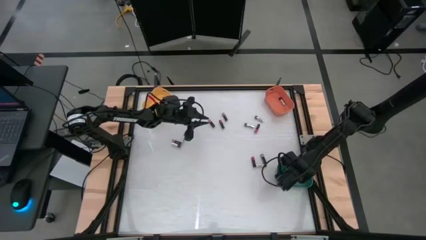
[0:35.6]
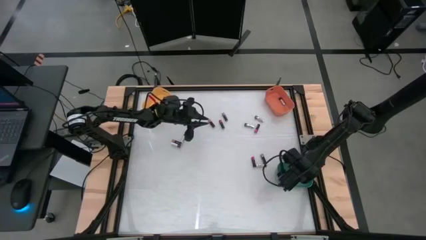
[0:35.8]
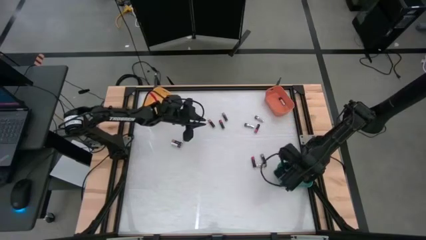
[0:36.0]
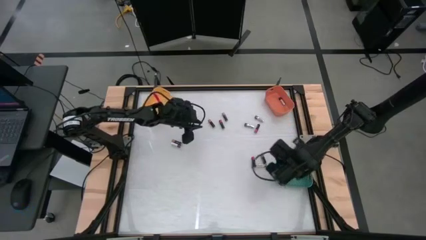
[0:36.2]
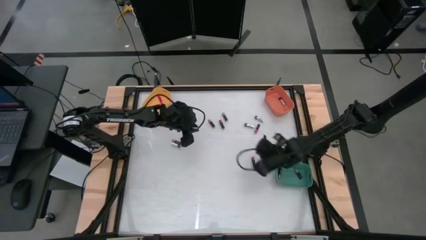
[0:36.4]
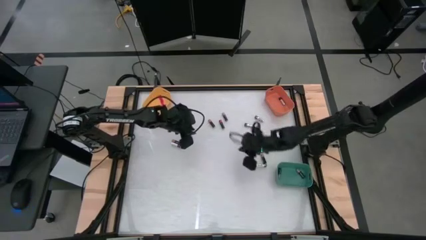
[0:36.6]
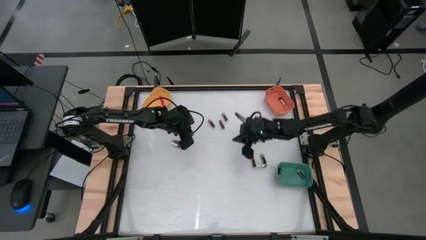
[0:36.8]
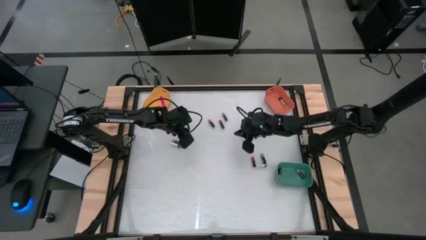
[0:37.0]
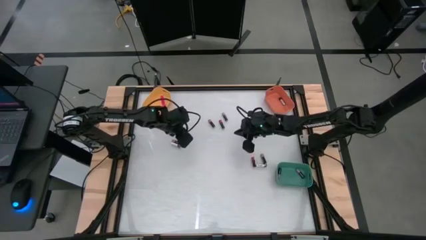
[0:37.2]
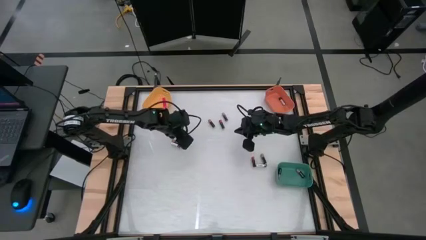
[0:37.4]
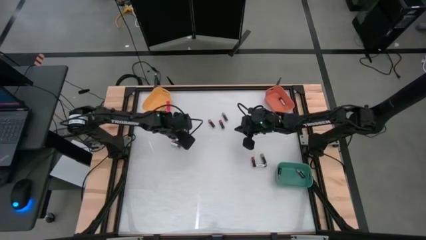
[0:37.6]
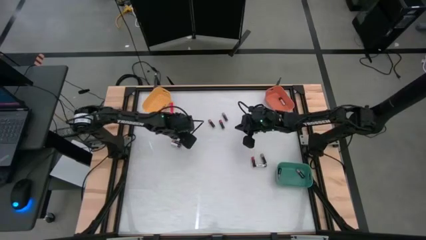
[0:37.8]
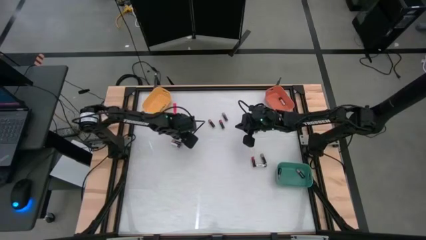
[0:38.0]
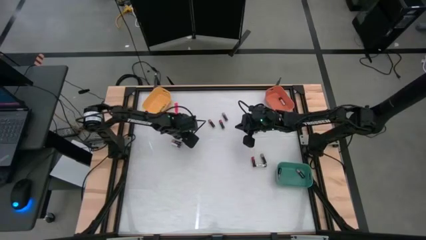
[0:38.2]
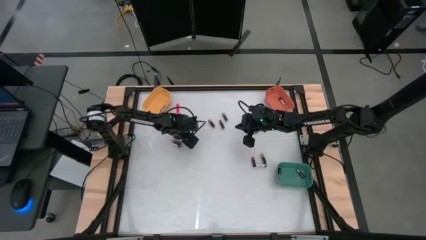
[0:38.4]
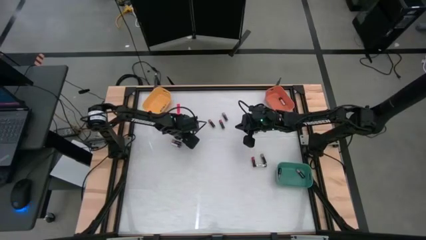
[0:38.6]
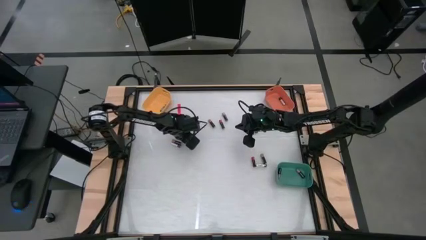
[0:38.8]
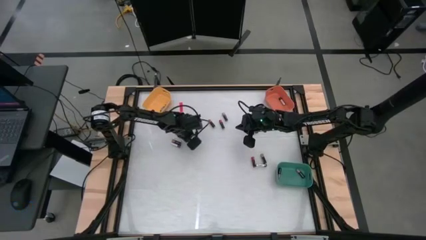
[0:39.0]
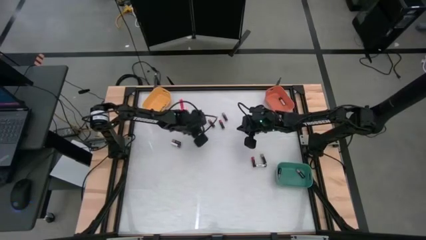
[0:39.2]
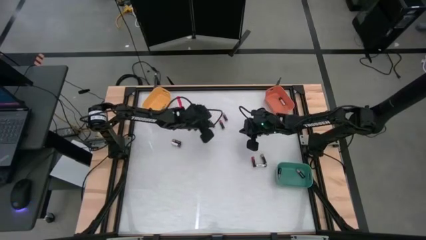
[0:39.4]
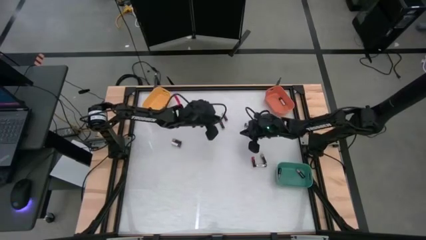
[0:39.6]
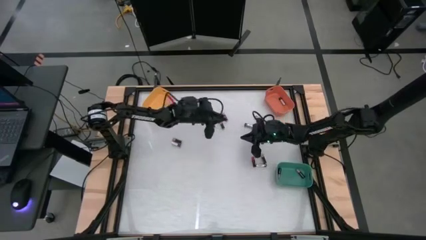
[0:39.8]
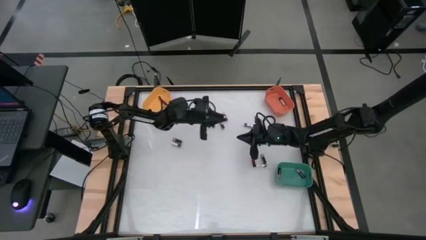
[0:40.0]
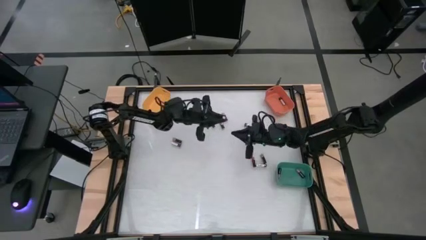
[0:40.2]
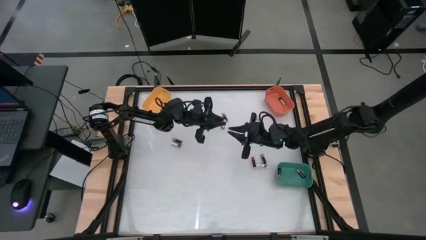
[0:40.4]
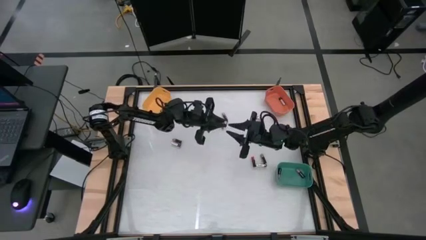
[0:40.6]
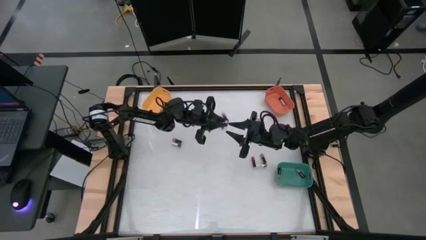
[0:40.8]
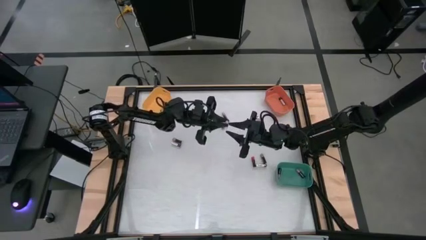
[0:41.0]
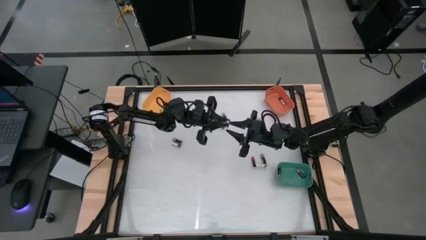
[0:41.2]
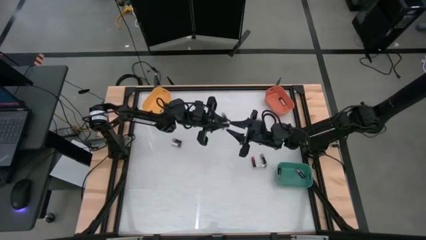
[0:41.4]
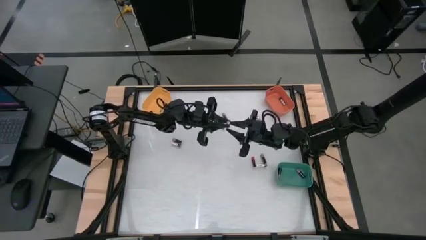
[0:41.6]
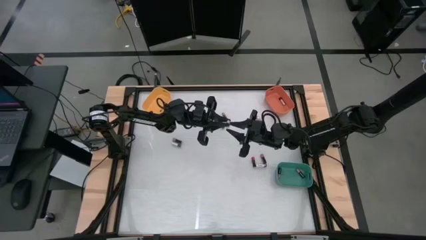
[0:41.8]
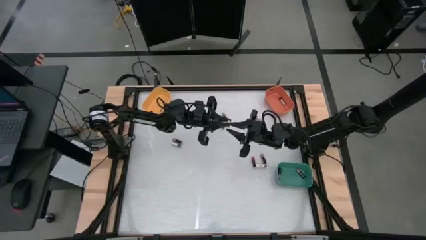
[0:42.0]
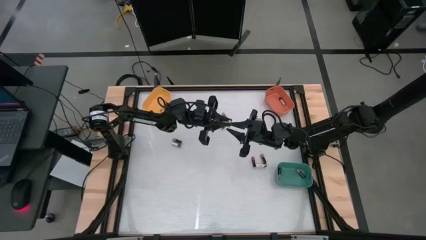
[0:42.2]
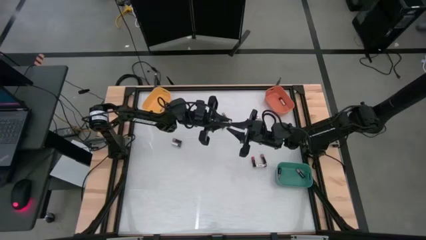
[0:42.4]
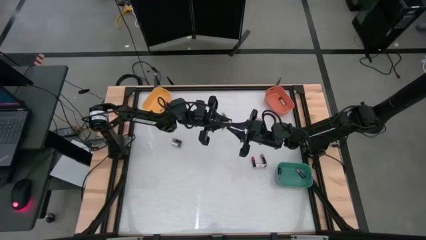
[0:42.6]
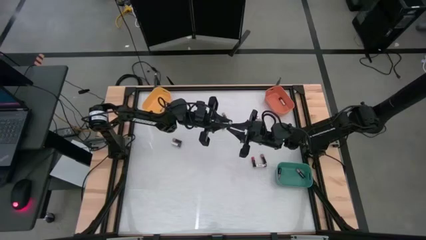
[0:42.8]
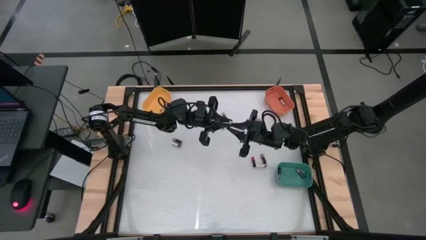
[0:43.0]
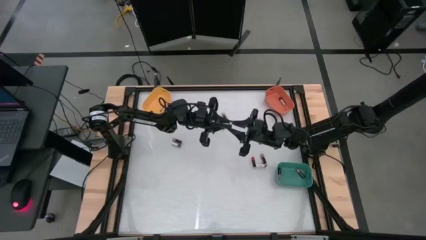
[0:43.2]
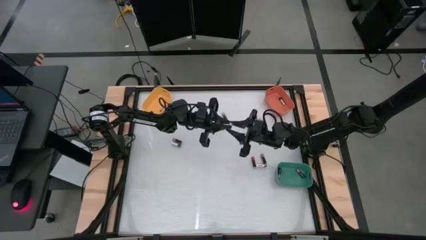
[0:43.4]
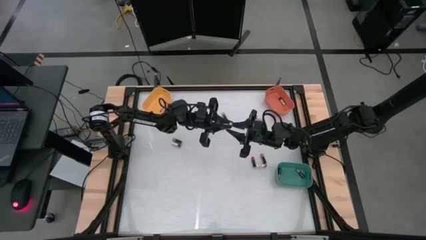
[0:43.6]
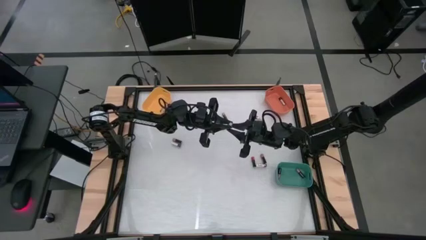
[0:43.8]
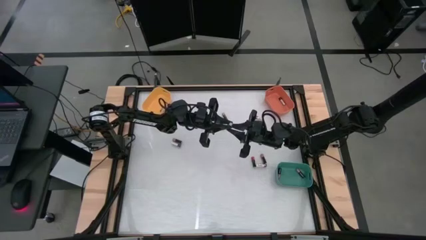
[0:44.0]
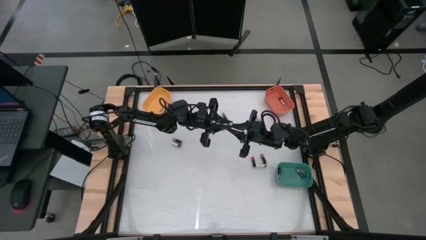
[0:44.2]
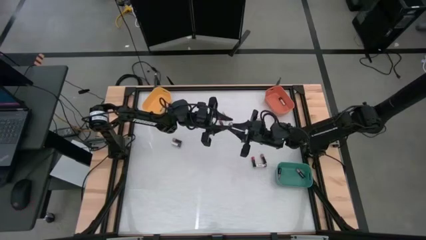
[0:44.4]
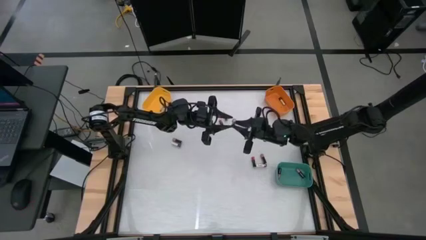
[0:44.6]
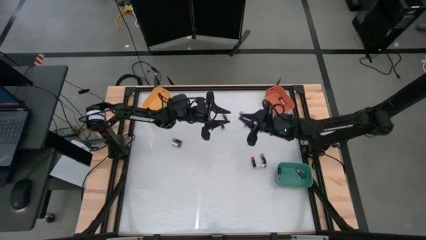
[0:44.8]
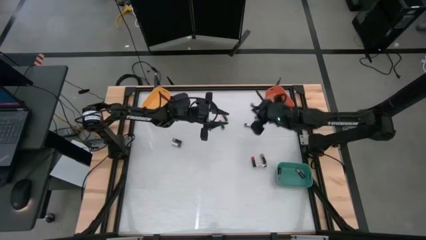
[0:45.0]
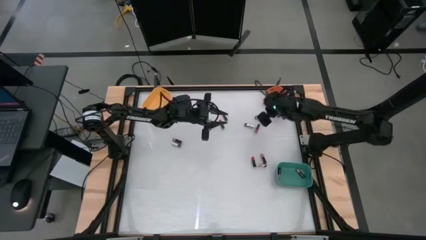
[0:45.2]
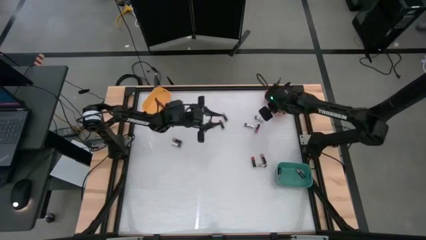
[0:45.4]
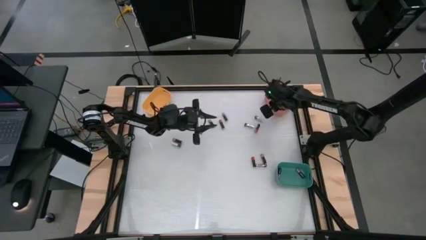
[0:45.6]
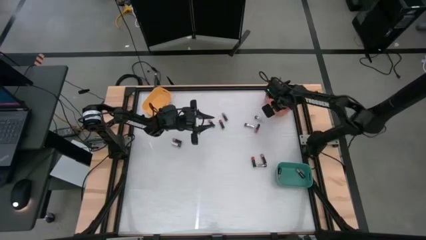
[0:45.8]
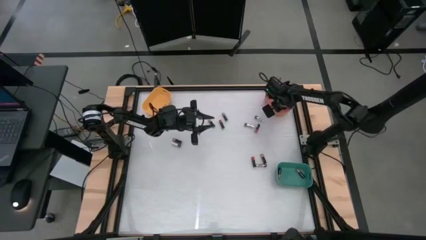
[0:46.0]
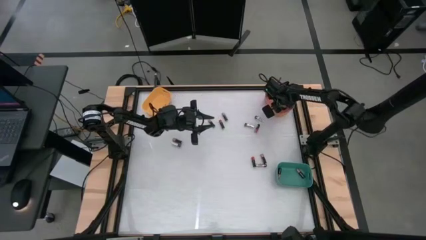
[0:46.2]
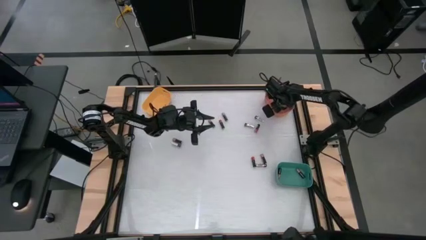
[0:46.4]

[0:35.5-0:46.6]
Task: Sort batteries
Put the silver battery into the orange bin

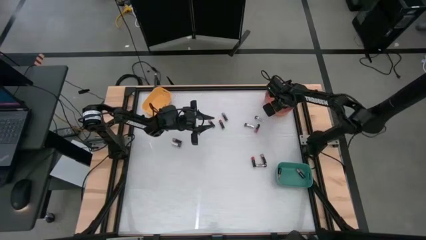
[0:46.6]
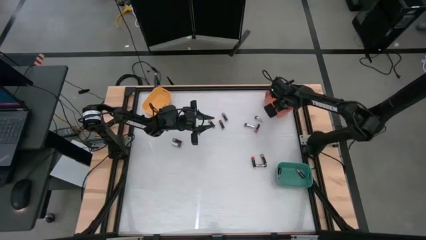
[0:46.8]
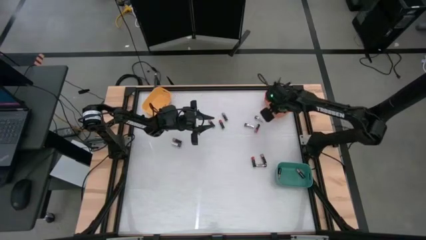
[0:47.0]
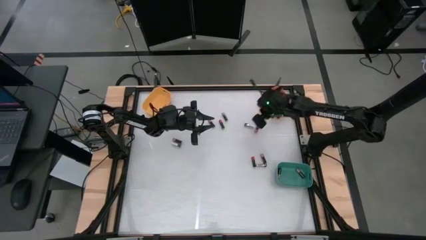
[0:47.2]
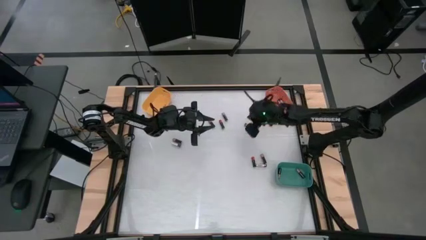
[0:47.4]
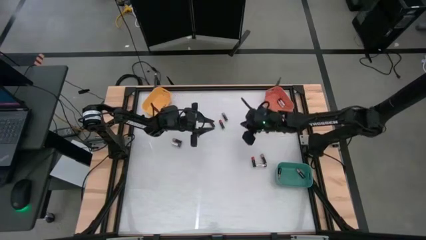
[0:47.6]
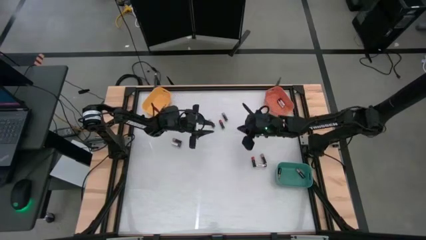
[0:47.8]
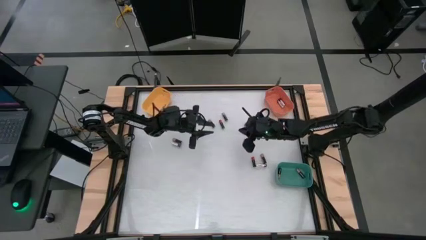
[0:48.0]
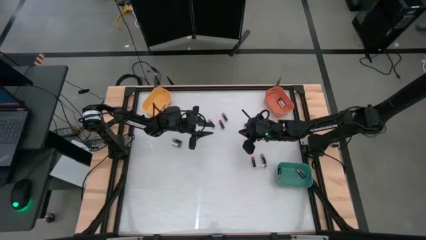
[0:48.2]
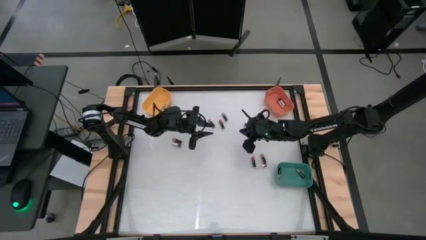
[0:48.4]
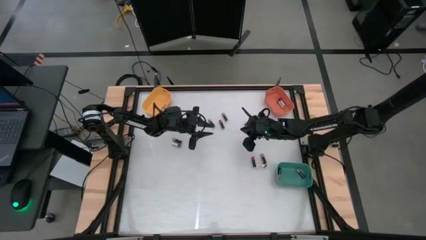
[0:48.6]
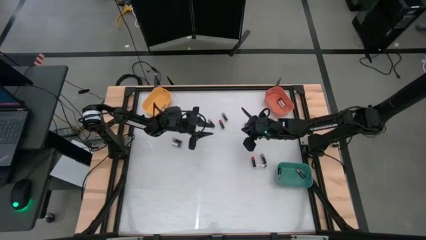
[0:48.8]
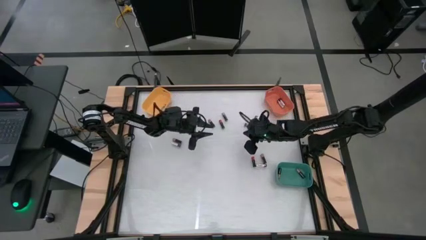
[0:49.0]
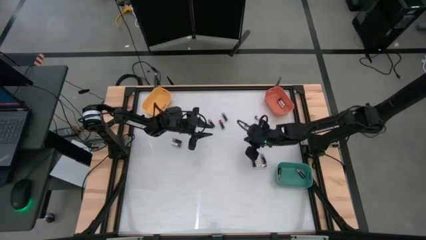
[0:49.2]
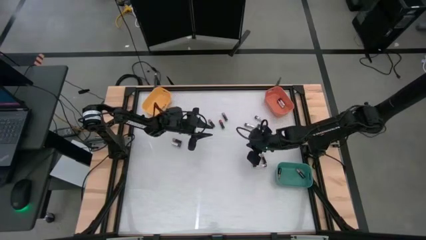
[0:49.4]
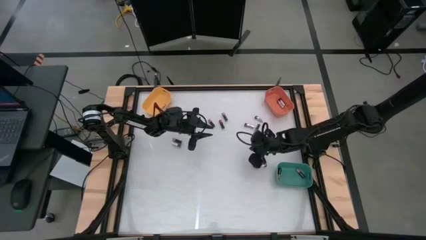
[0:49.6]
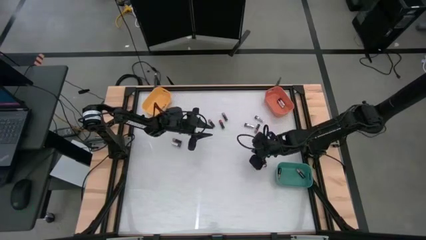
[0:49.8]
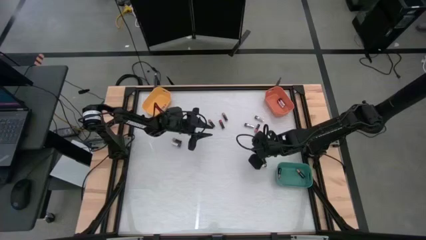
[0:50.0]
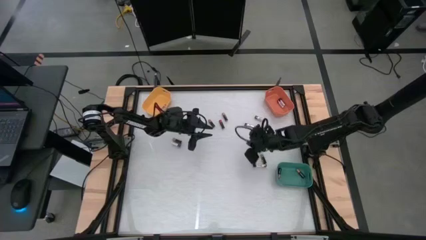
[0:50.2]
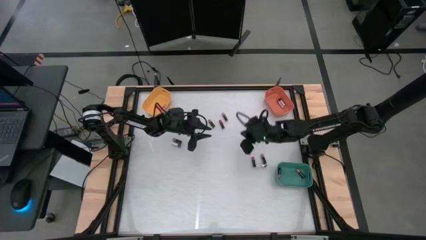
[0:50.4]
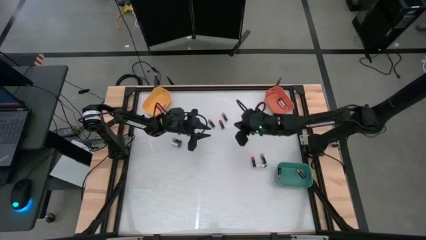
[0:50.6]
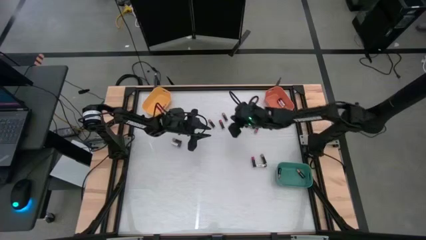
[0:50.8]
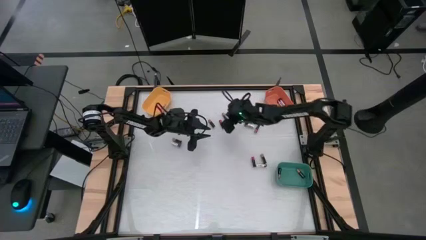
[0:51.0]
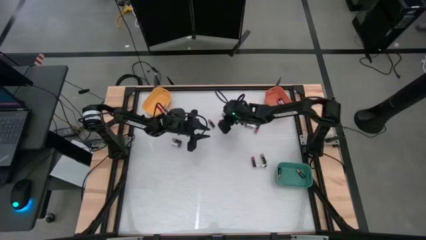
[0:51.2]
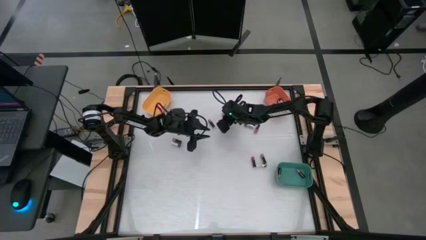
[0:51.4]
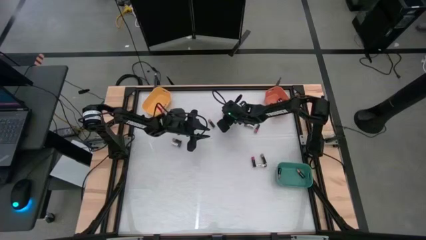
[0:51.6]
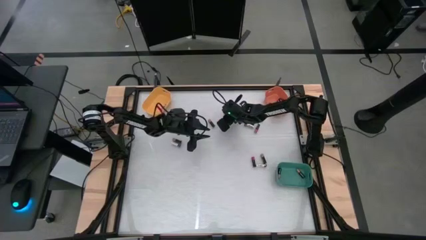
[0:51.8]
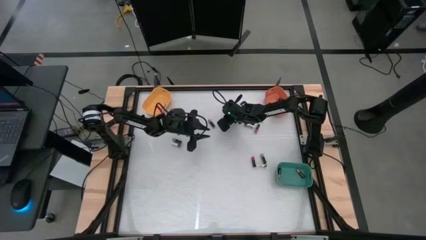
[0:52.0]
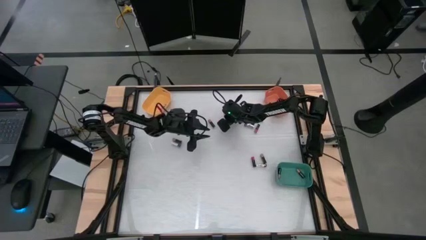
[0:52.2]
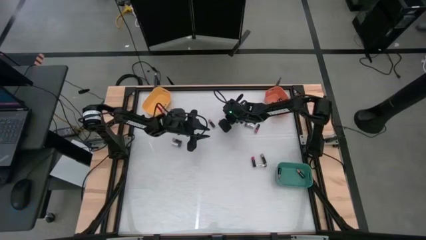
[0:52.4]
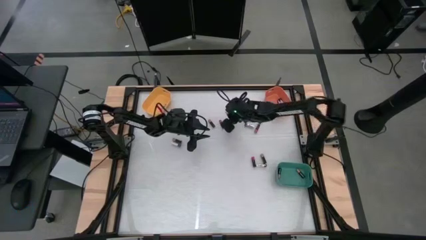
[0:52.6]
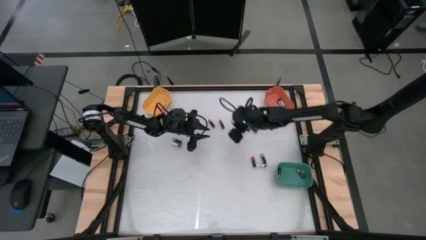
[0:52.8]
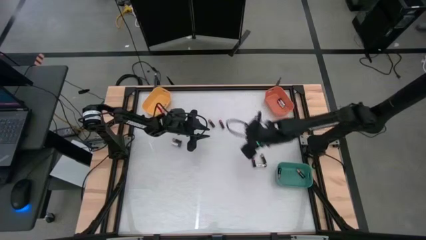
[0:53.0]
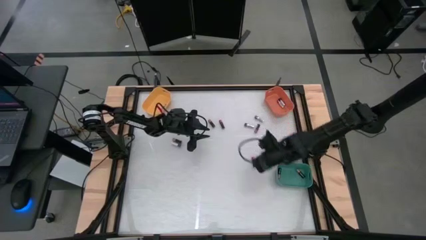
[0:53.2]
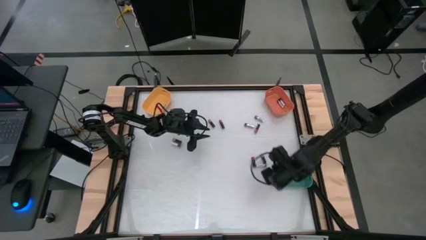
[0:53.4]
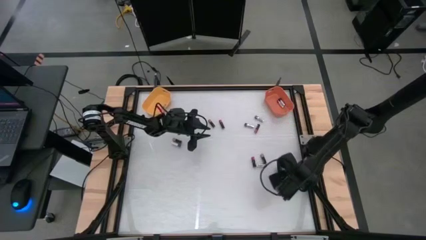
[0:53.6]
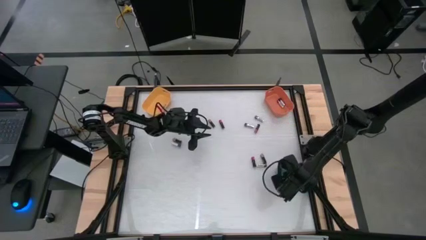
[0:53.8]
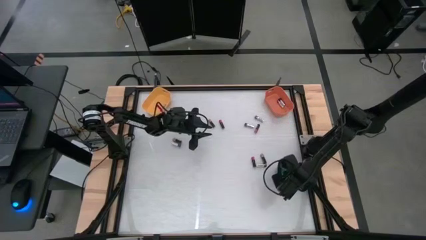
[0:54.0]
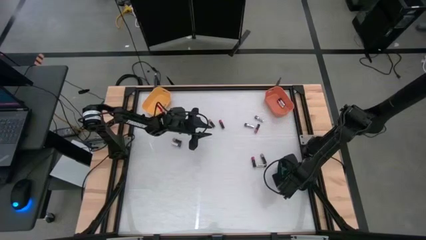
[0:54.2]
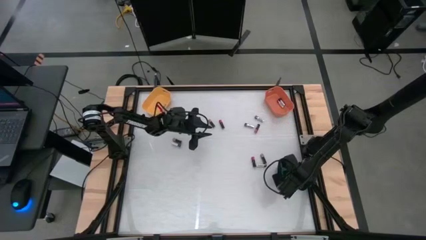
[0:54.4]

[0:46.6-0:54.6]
Put the brown battery into the green bin
